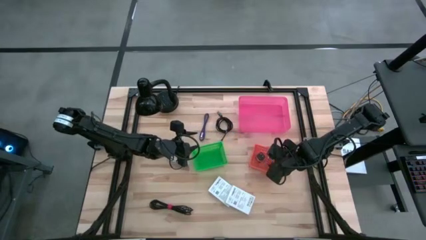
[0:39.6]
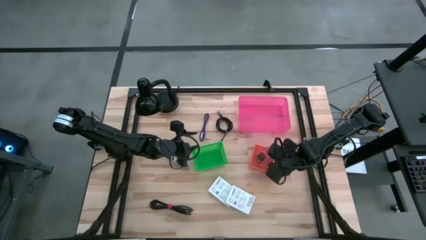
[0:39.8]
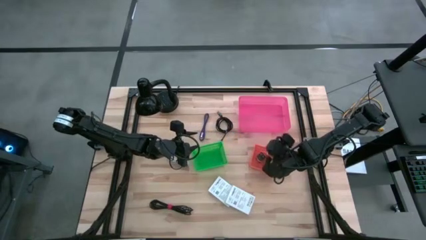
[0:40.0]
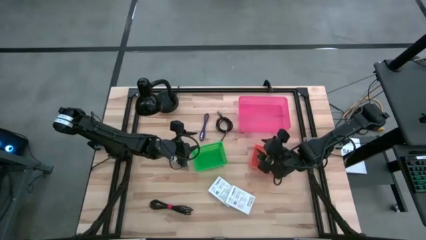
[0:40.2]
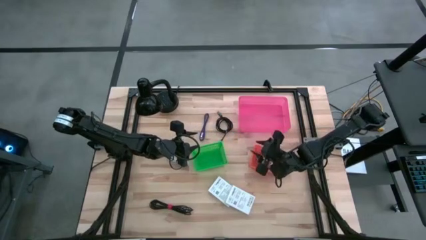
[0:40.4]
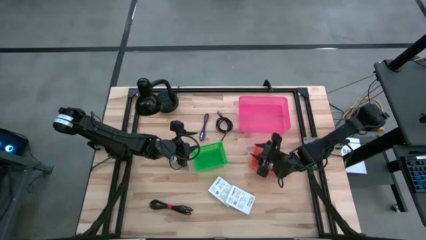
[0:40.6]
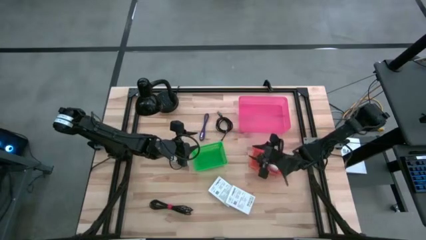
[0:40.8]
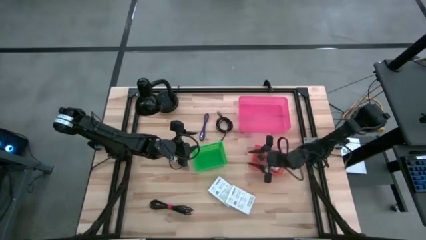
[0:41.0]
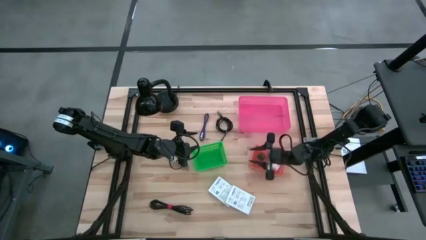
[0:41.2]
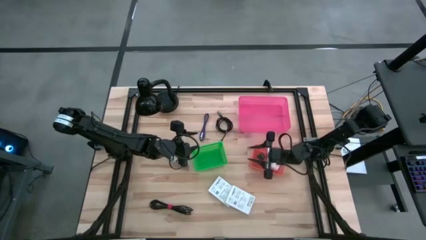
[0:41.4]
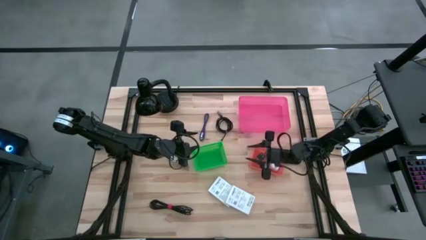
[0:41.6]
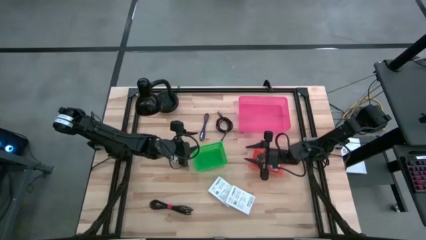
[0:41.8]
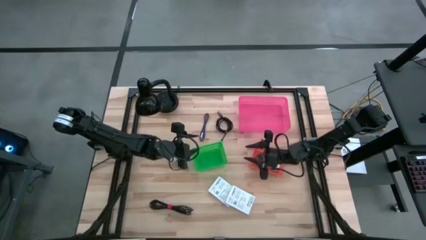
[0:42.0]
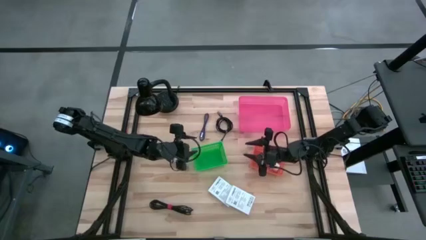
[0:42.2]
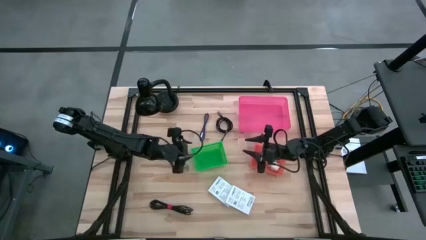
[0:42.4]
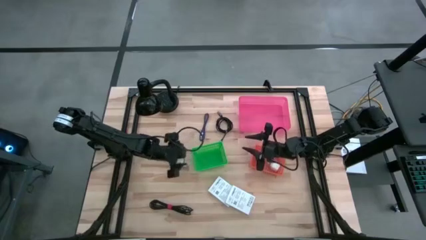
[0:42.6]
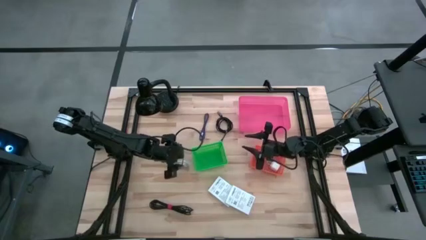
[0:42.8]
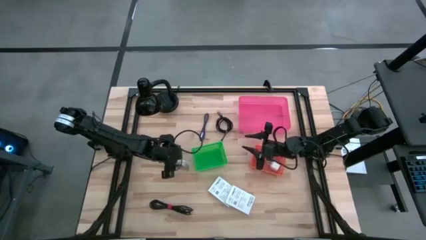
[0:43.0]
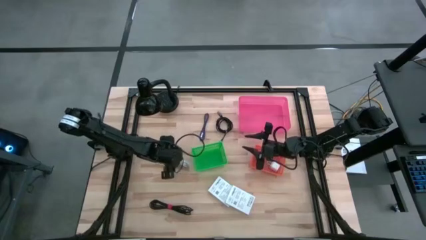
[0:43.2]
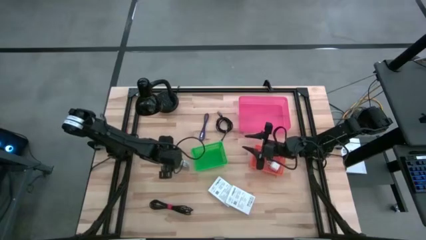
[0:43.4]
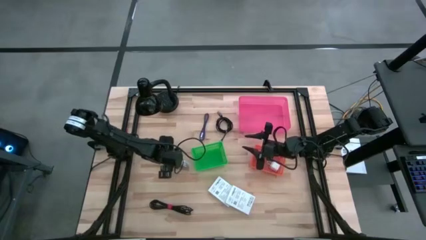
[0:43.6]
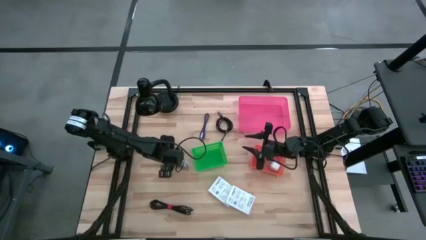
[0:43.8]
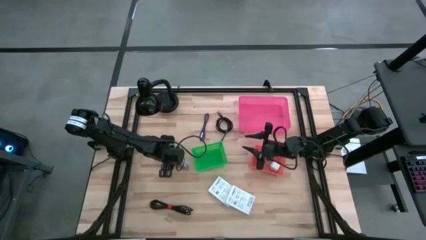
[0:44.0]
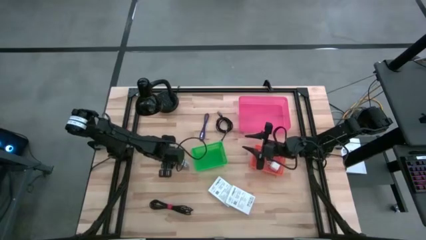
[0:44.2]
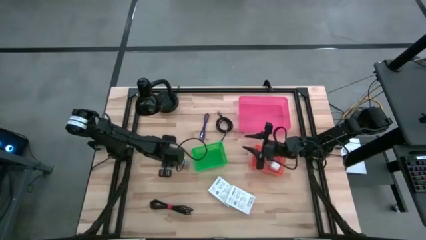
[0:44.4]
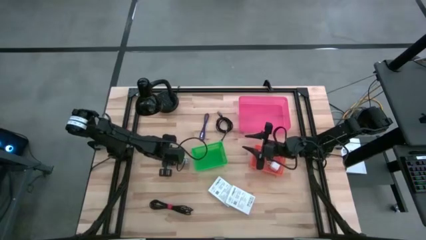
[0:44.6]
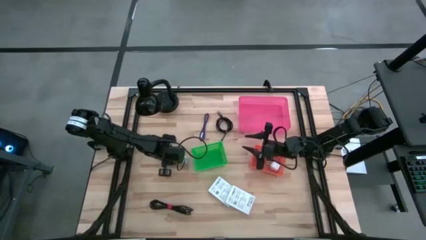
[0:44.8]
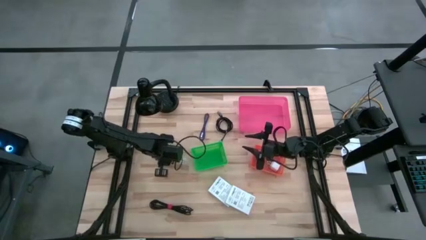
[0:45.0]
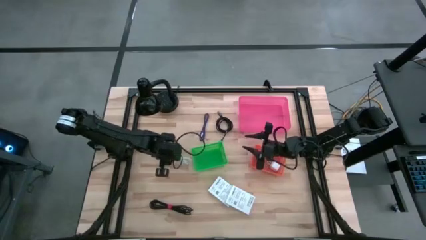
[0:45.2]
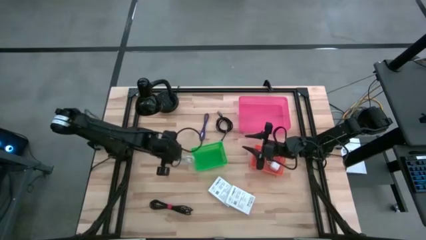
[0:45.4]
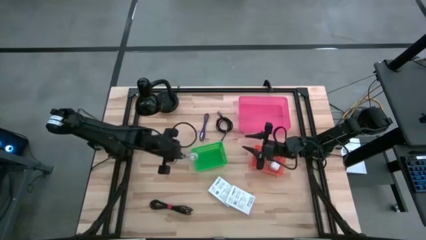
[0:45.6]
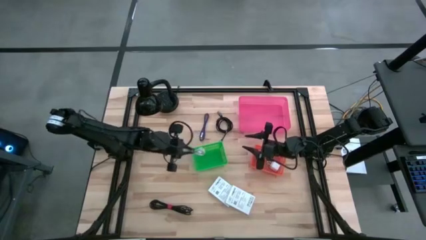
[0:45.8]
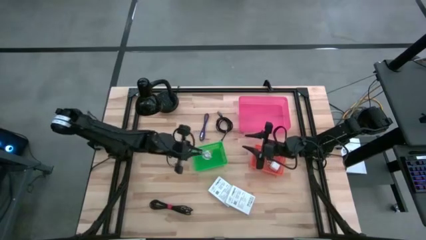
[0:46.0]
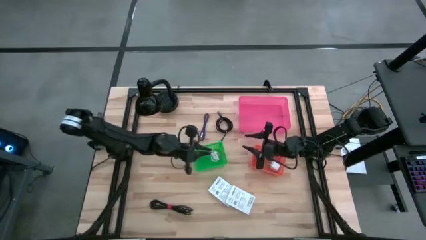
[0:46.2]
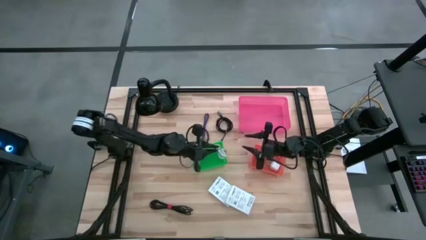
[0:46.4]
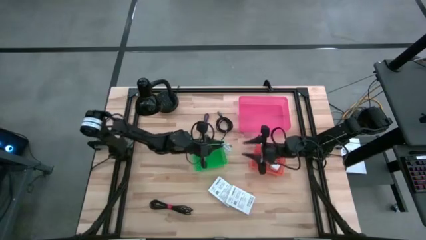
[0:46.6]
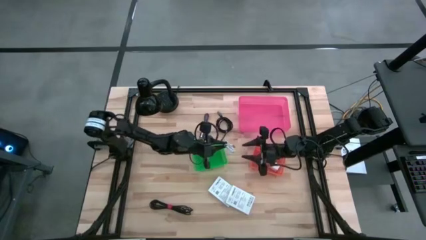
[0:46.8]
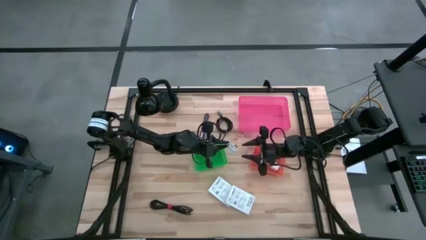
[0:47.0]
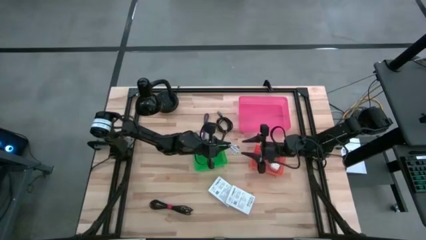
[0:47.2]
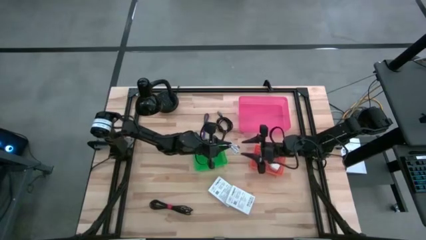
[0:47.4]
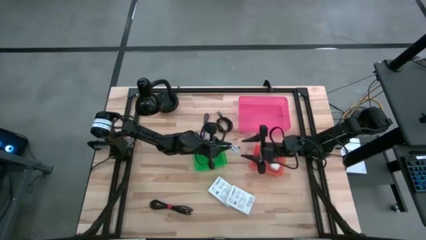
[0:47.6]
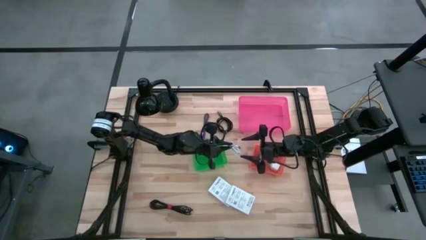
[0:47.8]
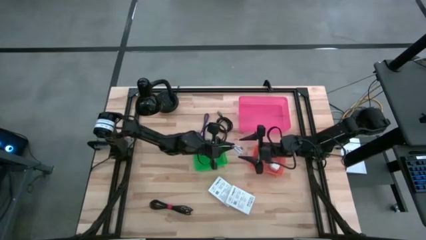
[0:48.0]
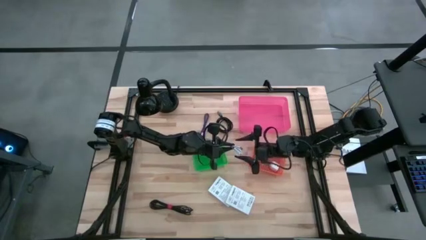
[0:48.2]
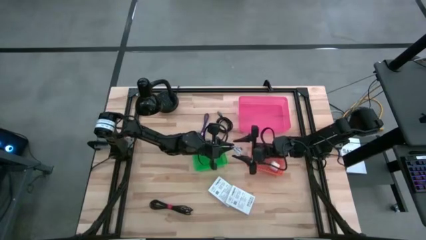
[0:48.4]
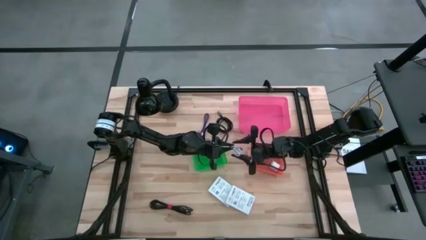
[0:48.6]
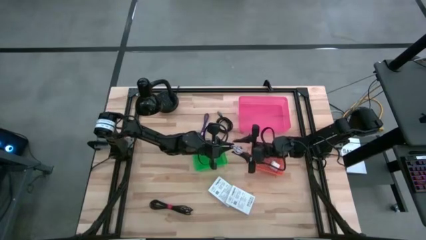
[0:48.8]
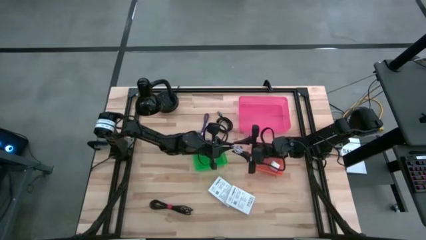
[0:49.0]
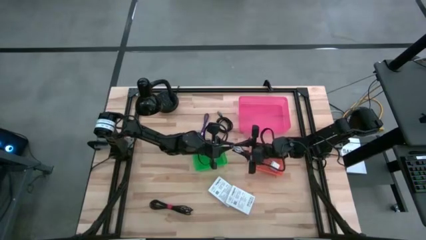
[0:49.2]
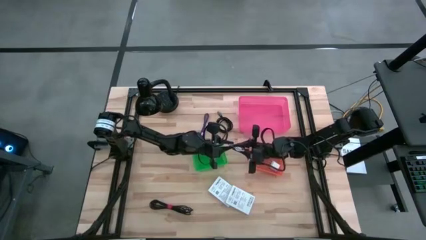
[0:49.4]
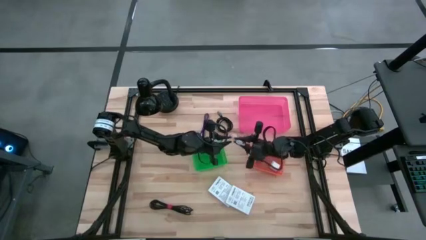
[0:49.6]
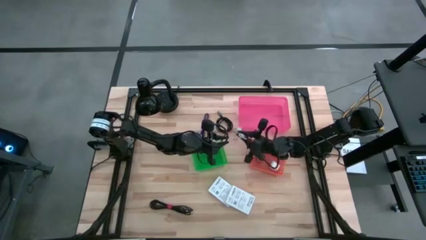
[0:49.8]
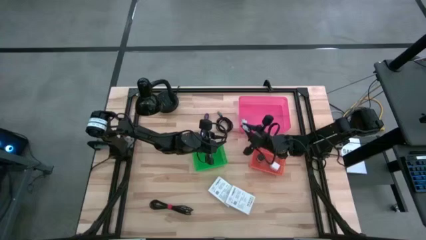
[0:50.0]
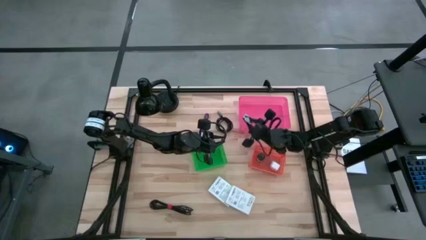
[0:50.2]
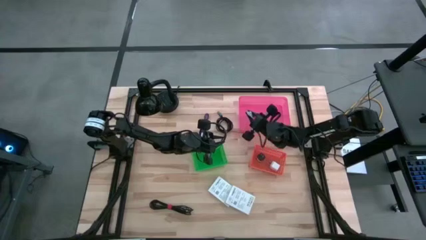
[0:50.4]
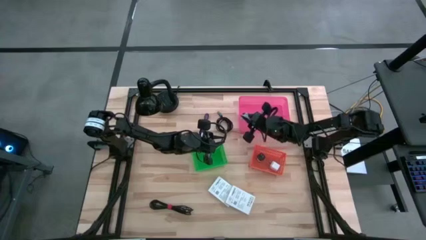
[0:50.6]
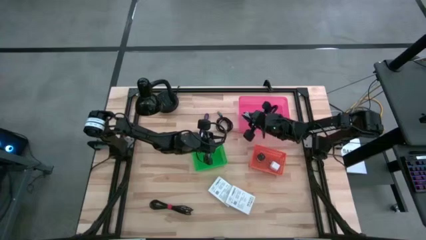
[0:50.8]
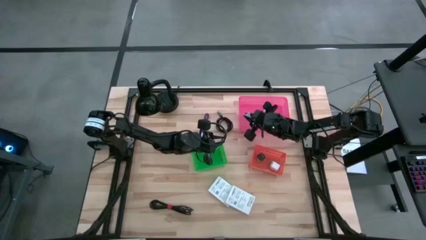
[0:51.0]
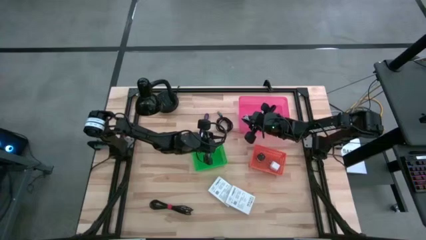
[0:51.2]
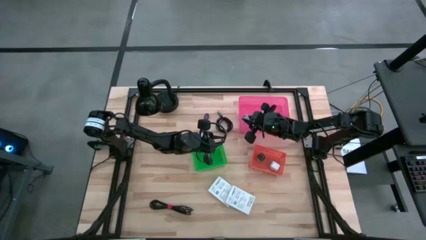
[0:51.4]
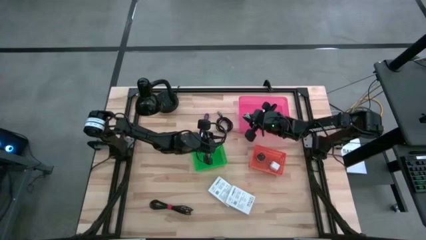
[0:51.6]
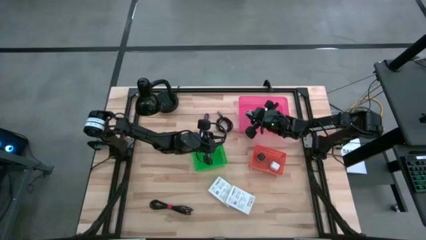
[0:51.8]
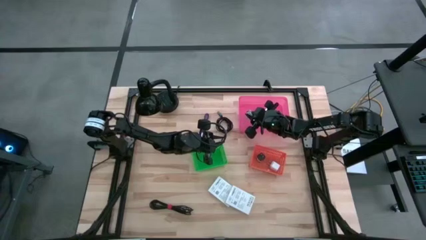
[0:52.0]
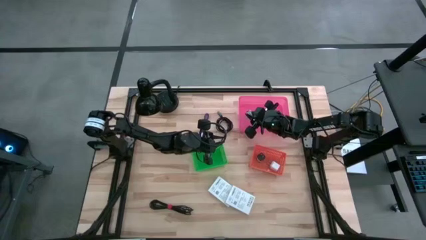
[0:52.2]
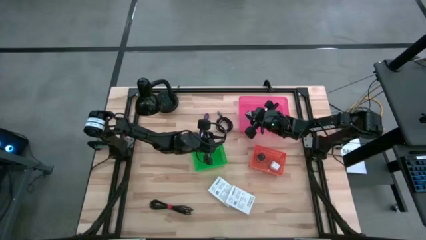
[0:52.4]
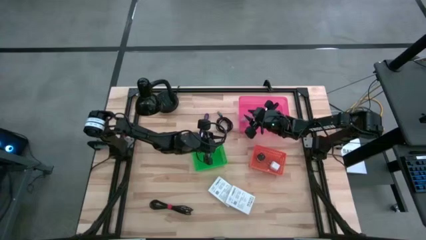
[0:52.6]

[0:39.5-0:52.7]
Task: Pick and place items into bin
Put the white charger cable into the pink bin

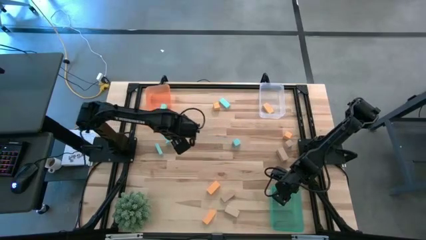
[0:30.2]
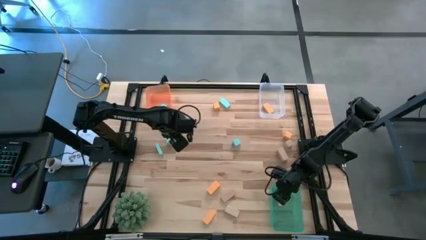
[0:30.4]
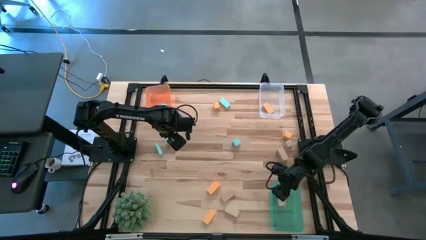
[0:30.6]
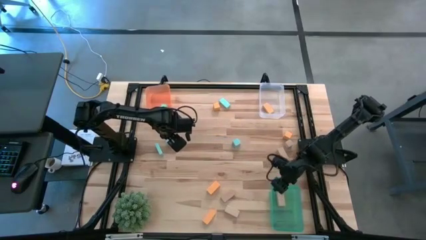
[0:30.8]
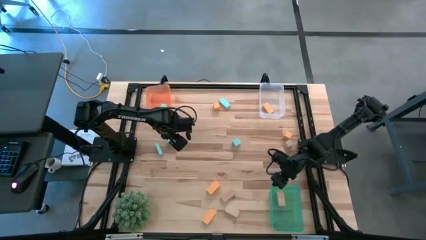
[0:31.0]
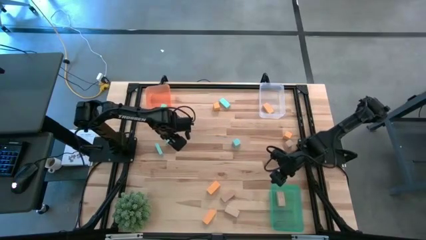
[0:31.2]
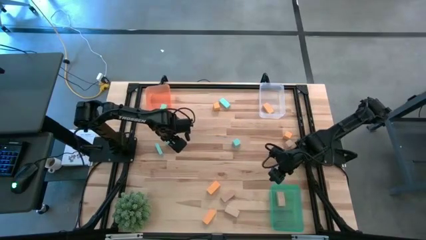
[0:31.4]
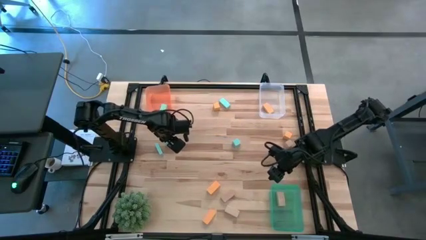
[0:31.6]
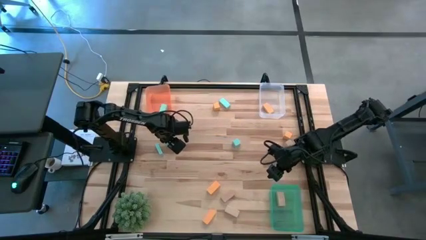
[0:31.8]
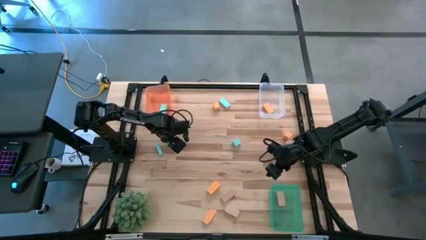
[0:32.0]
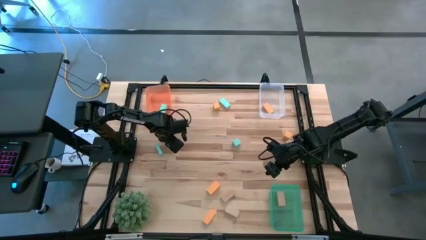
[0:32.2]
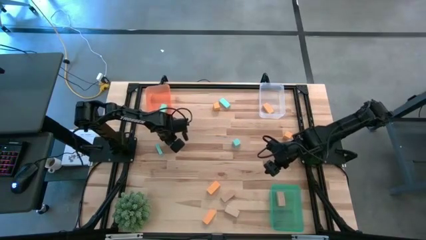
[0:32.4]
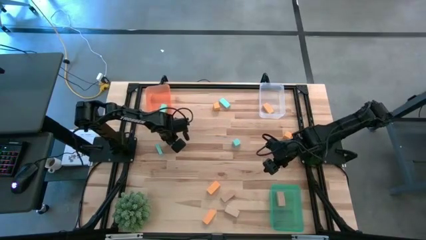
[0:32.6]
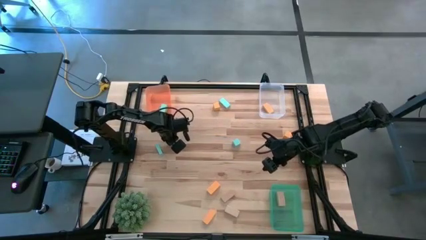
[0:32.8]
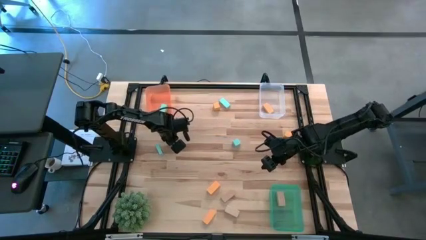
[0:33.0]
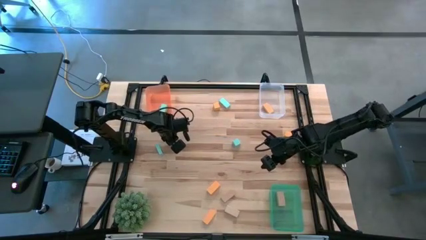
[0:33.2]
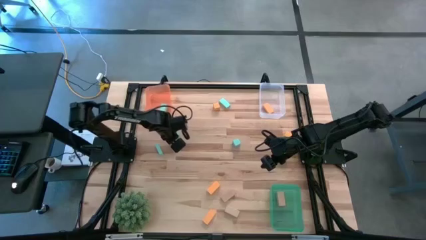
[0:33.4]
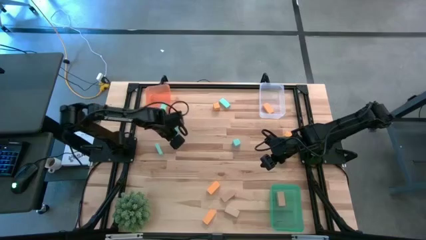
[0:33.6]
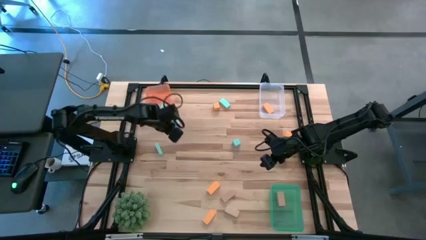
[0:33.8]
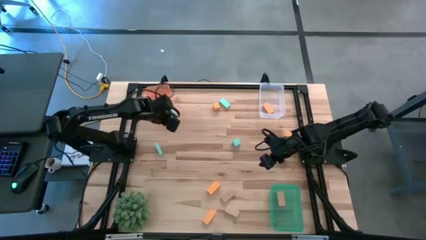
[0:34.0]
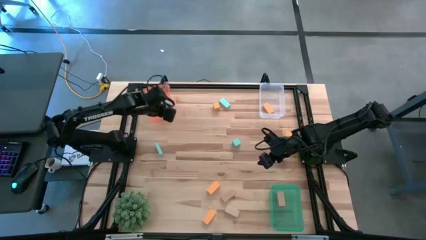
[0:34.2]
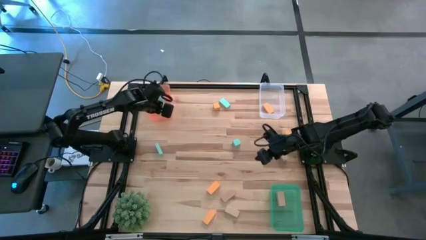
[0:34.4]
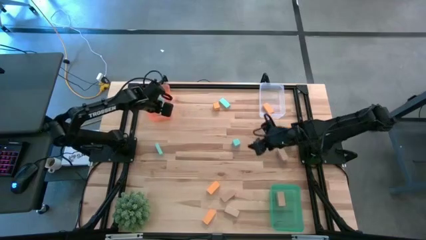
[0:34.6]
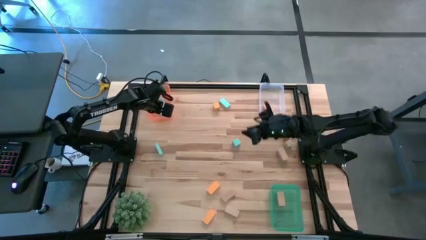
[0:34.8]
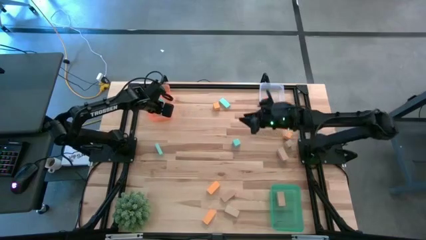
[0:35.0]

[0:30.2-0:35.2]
Task: Sort & place blocks by color
Put the blue block into the light orange bin
